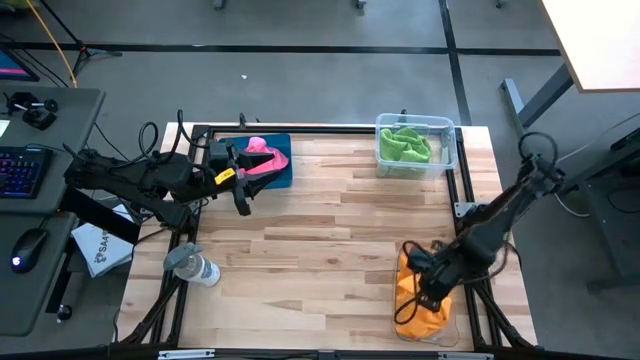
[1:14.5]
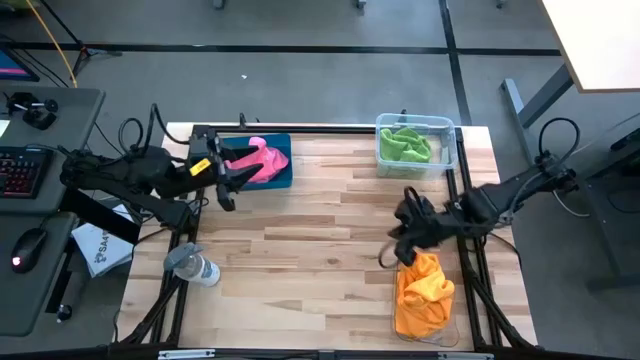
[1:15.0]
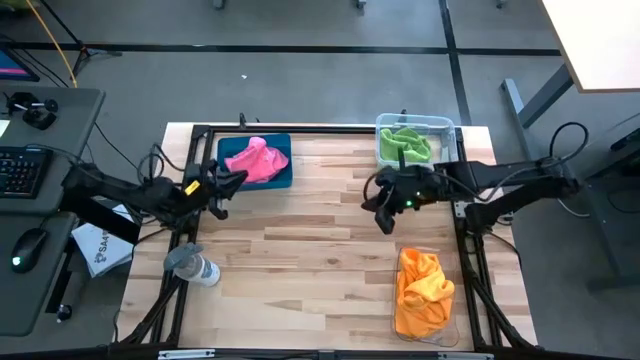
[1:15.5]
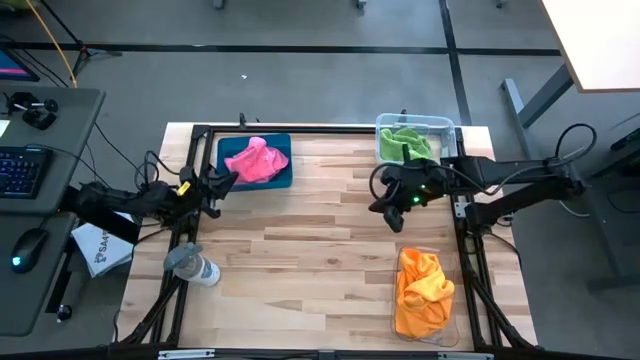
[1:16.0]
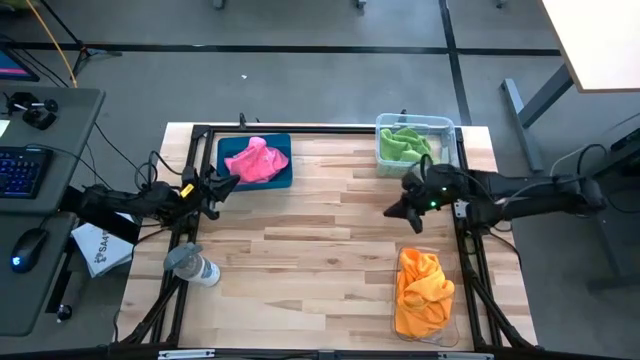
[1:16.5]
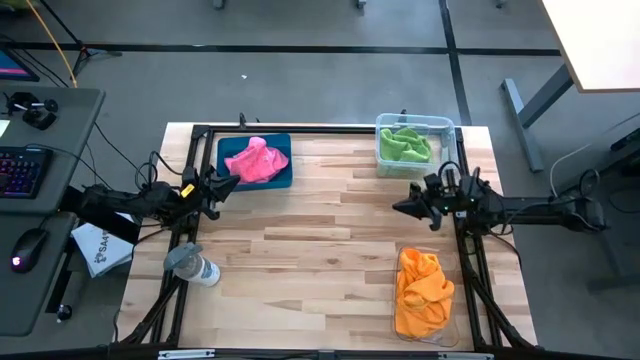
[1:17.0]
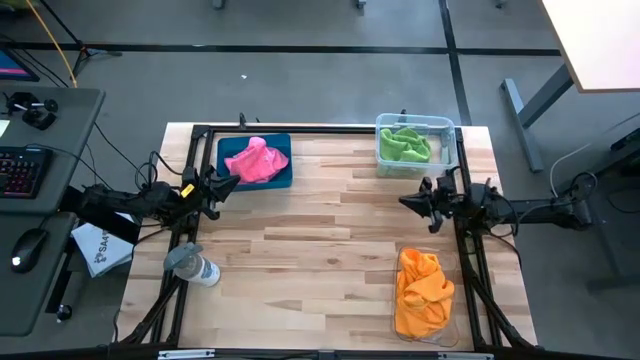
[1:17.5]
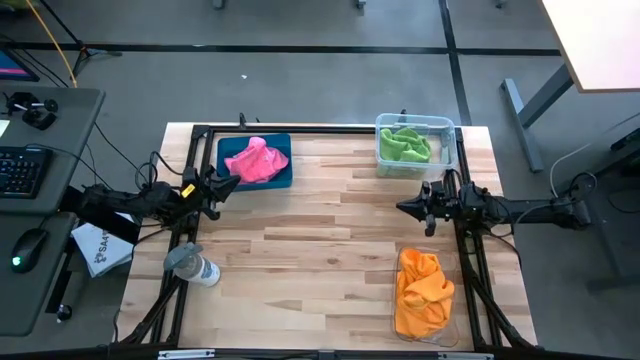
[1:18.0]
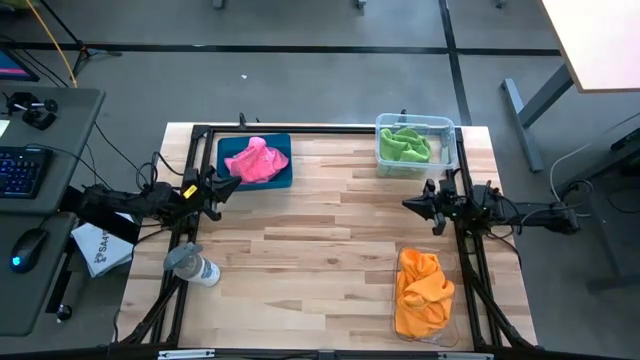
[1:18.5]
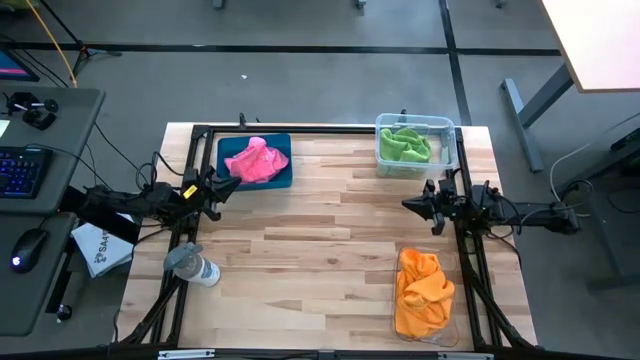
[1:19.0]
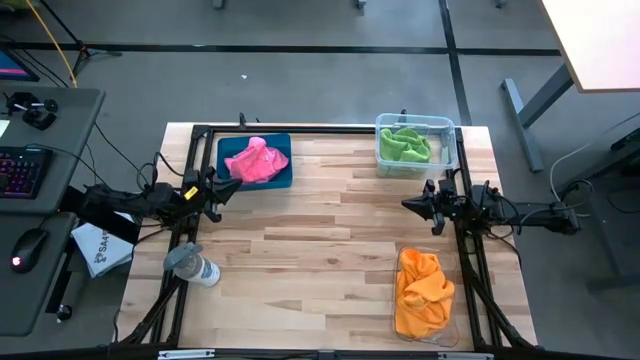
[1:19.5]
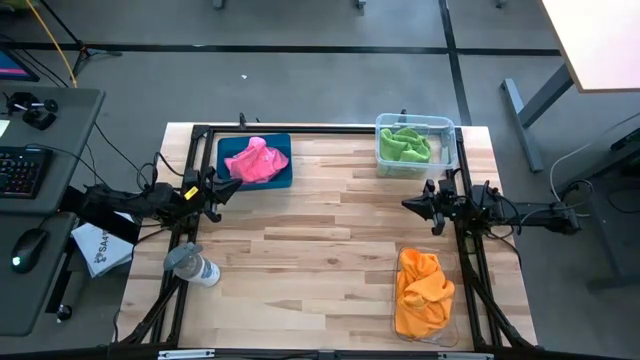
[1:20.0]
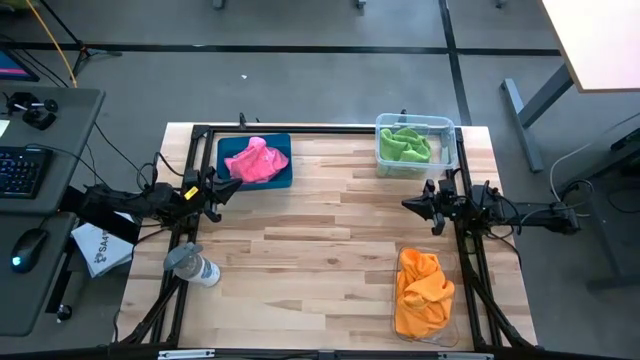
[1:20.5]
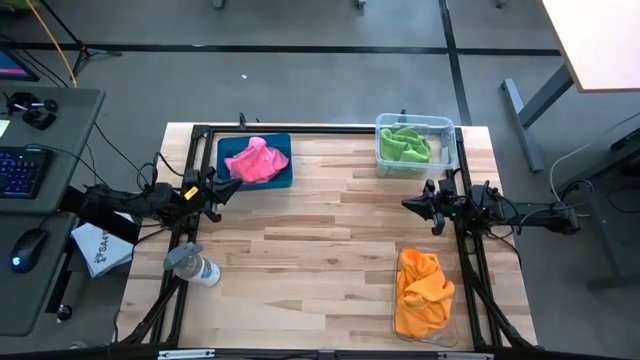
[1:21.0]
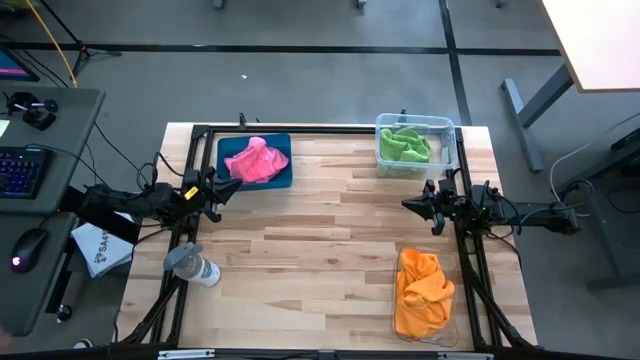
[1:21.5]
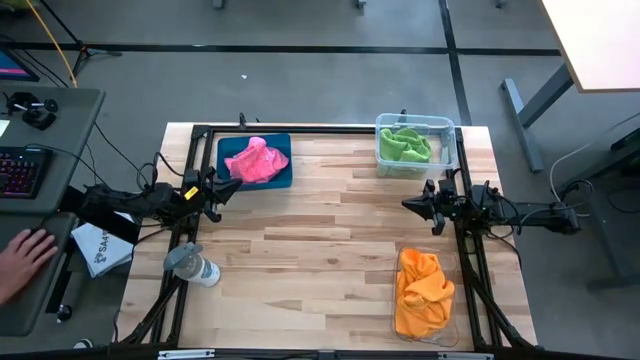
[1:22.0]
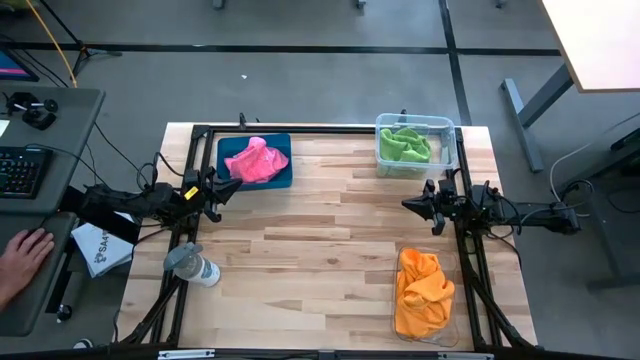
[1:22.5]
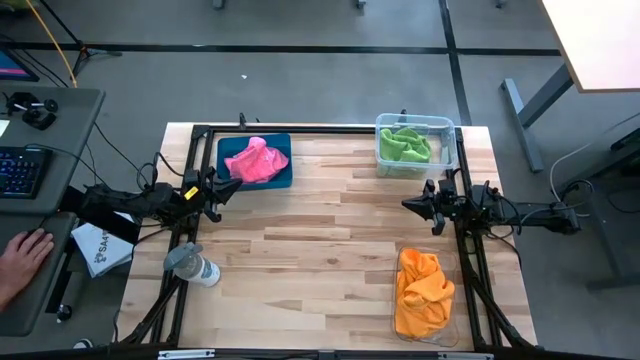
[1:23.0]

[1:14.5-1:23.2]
Task: Sort microfiber towel by color & place in baskets
Return to Home Position

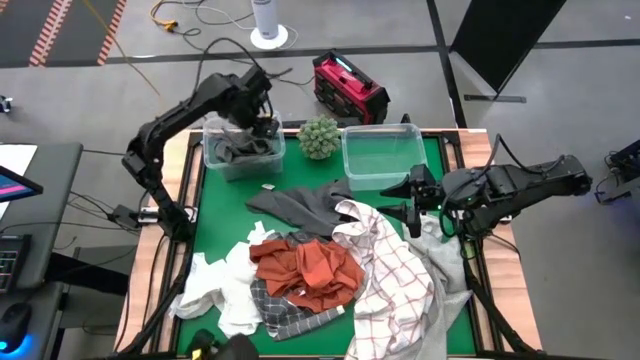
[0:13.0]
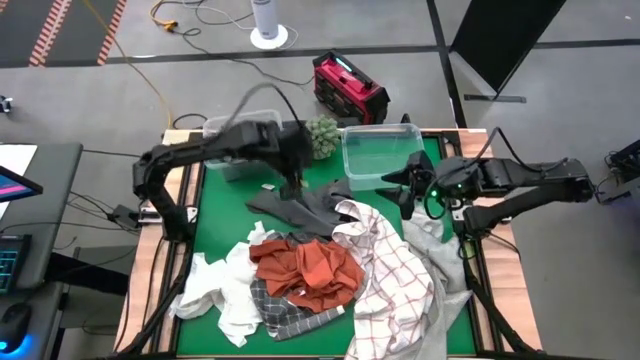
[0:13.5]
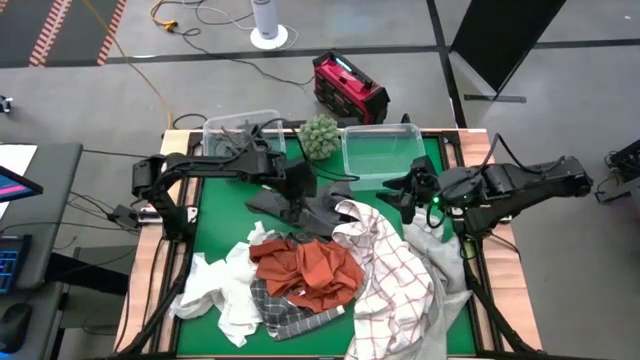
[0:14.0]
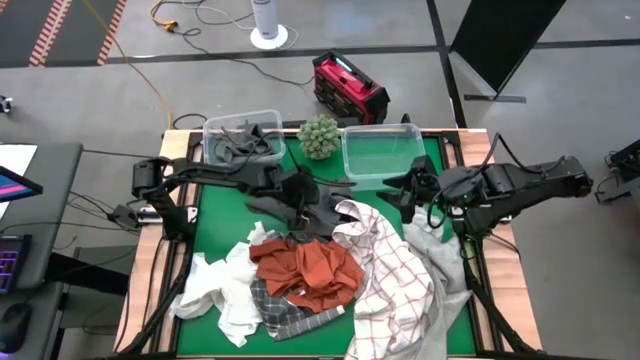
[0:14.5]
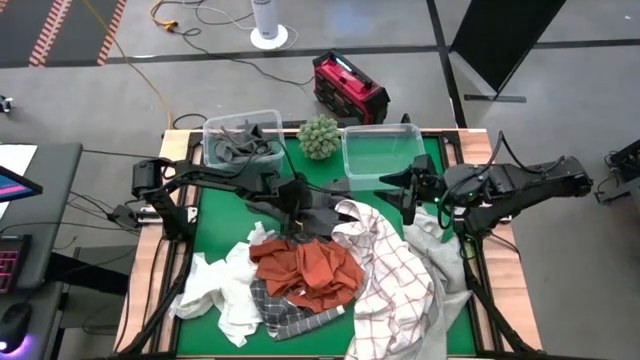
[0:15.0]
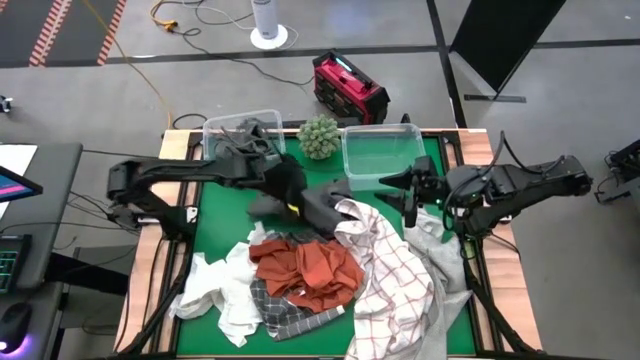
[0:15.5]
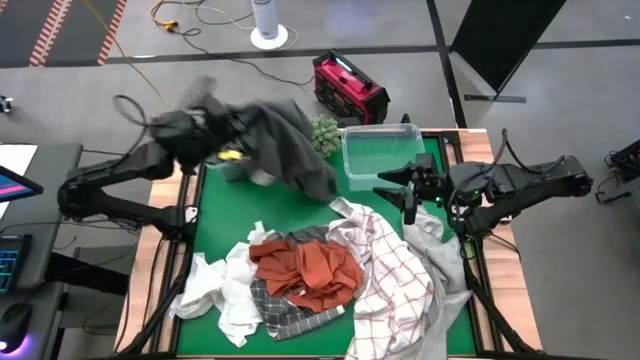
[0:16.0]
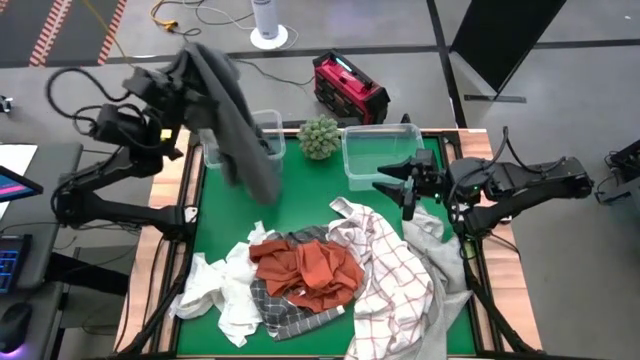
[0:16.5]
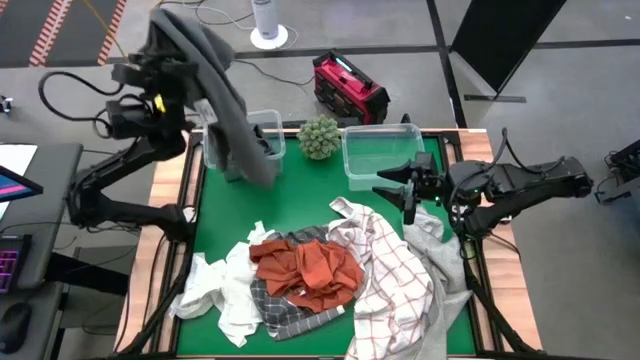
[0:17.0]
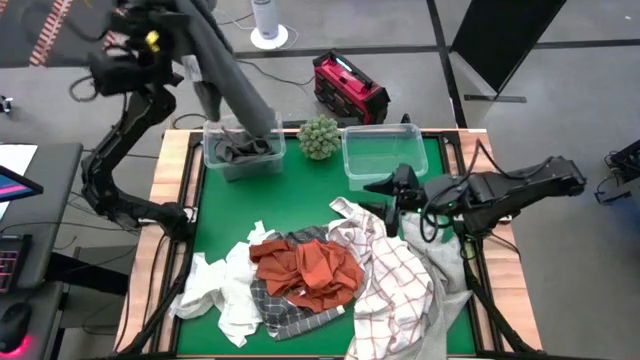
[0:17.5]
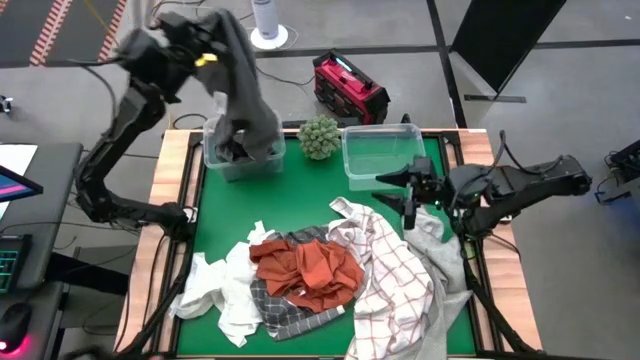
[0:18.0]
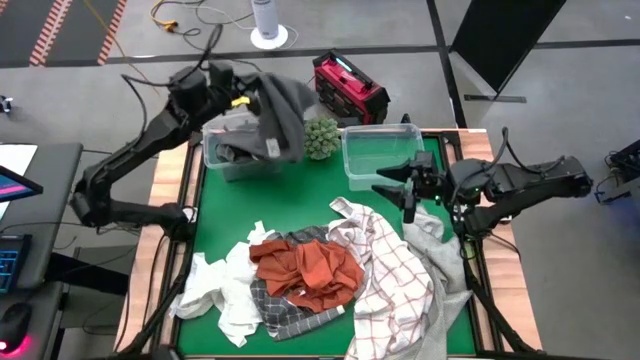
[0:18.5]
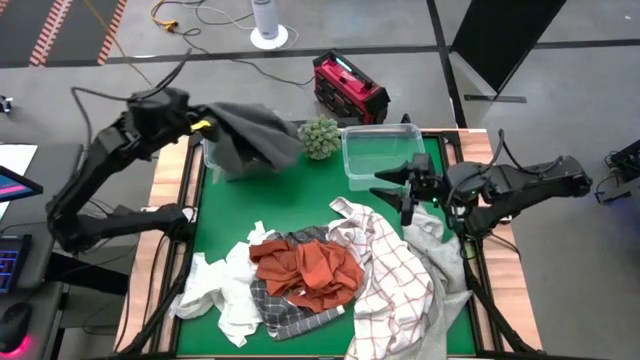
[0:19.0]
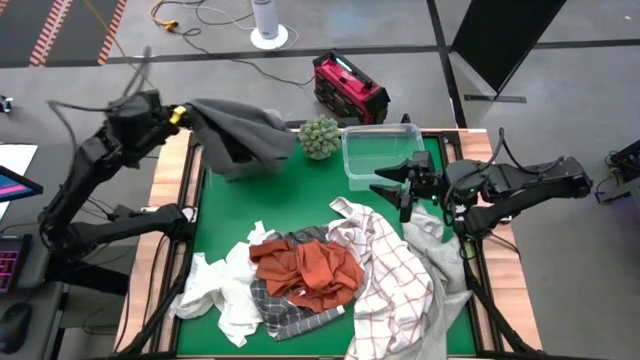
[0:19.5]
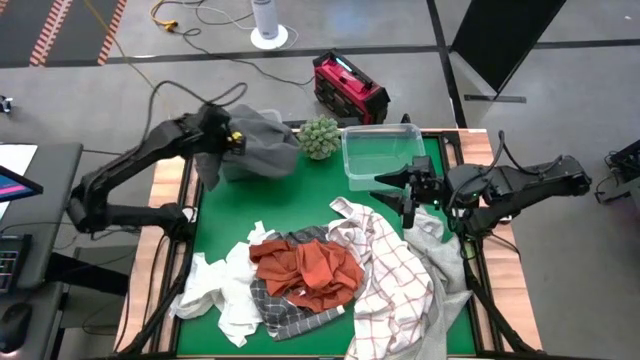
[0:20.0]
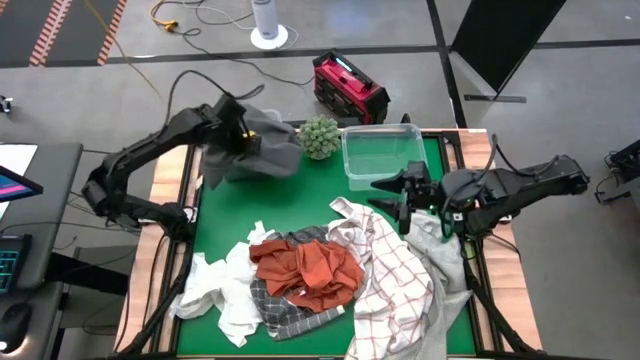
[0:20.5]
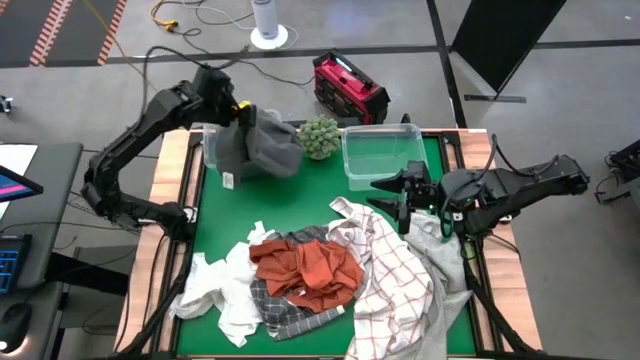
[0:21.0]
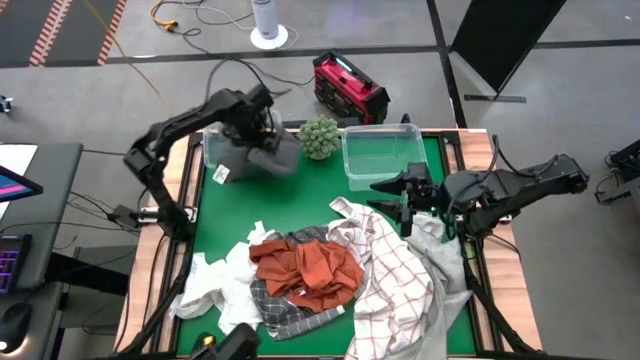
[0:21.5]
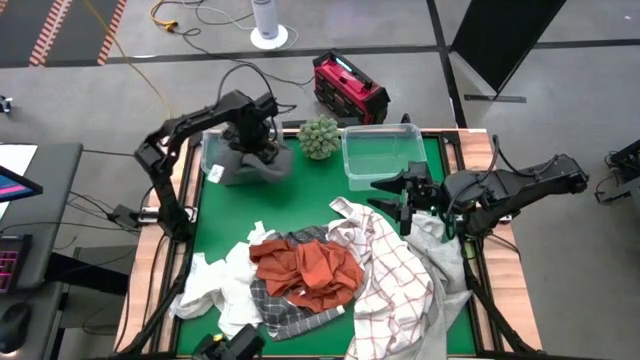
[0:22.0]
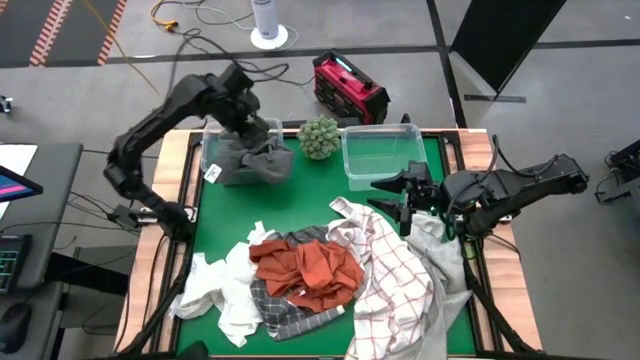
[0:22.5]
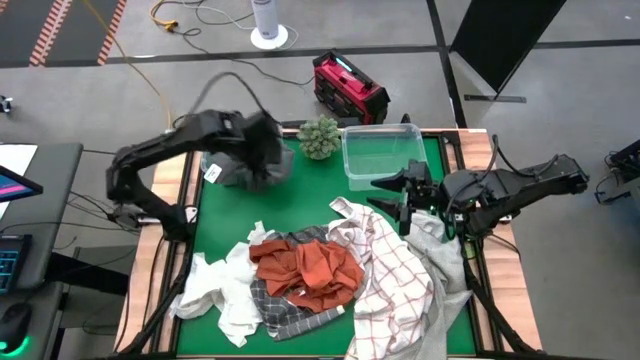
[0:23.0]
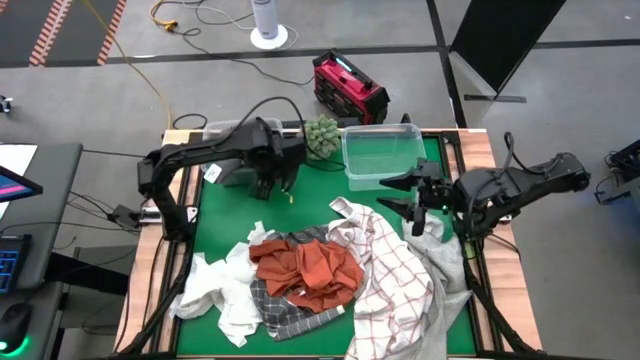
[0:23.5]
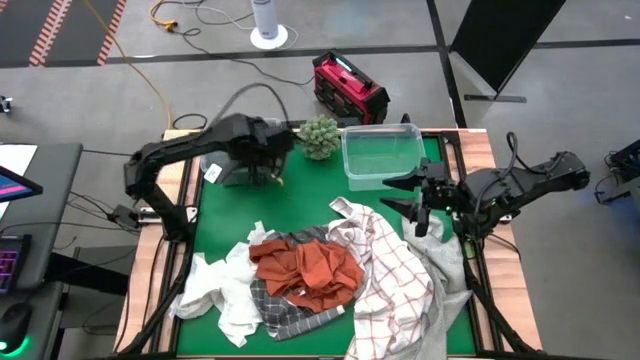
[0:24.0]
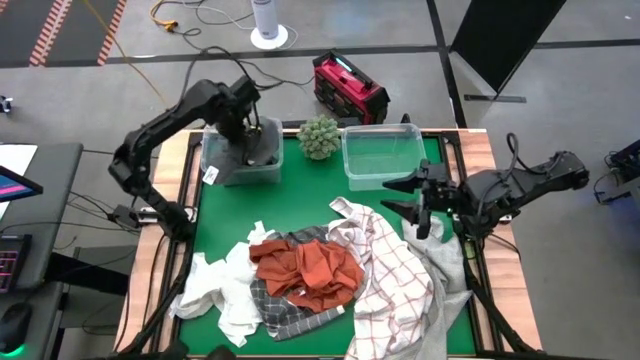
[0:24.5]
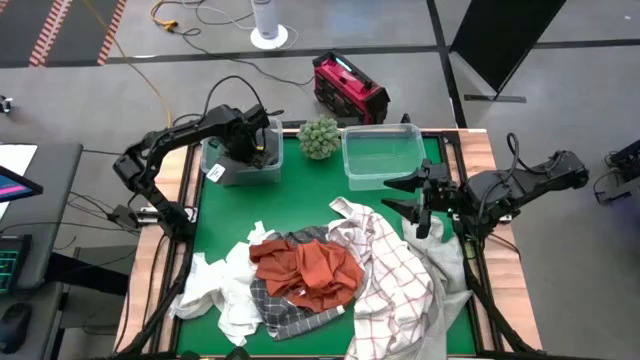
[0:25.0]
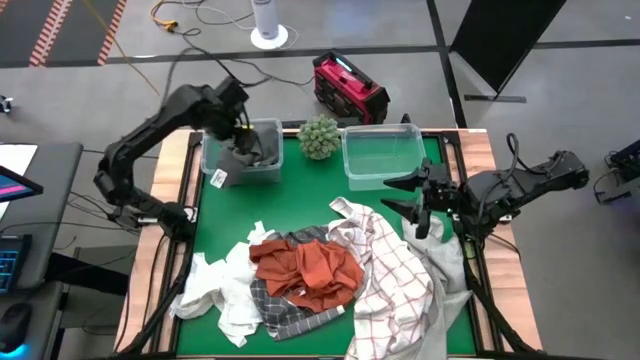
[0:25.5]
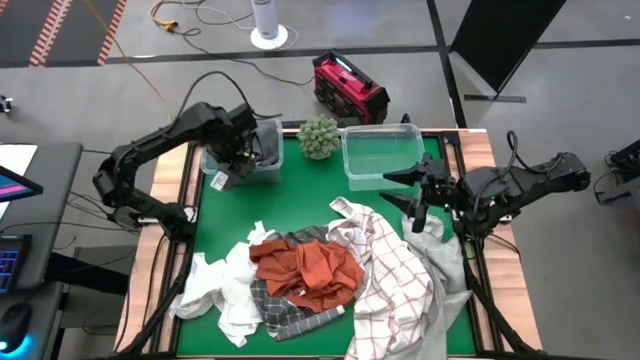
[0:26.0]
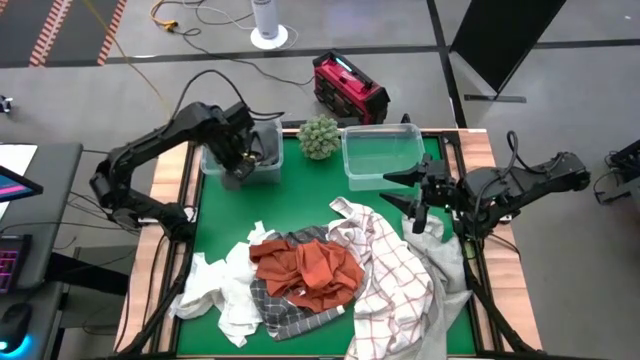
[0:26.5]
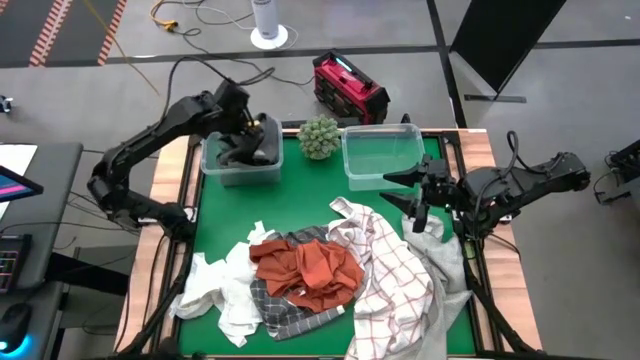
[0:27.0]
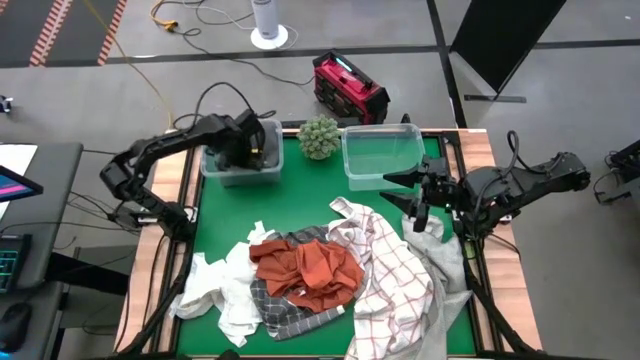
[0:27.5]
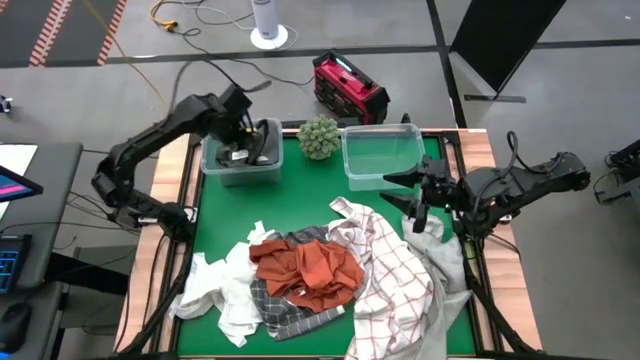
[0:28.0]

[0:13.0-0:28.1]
Task: Sort towels by color in basket
Put the dark gray towel into the left transparent bin
